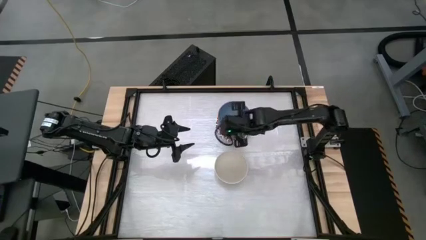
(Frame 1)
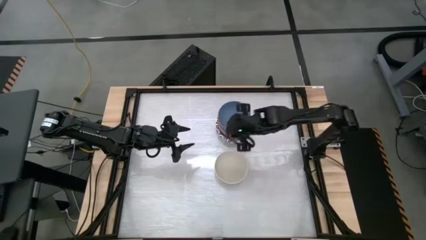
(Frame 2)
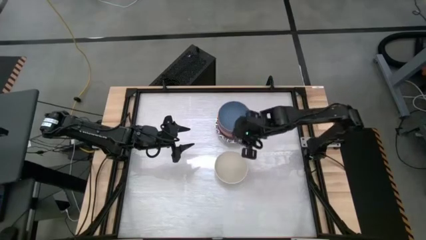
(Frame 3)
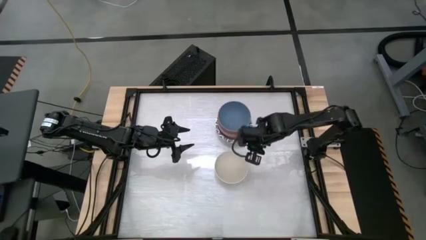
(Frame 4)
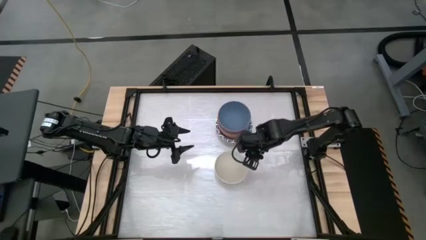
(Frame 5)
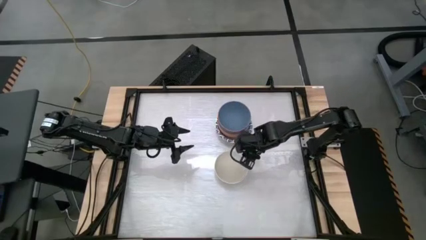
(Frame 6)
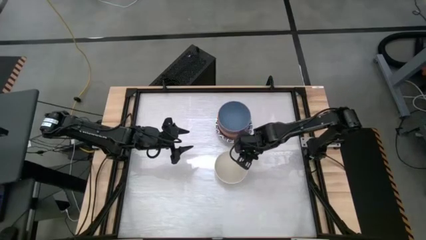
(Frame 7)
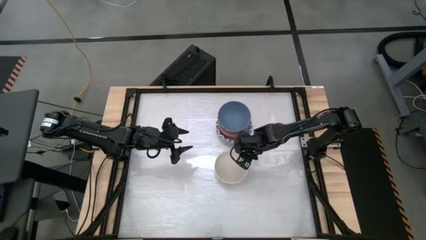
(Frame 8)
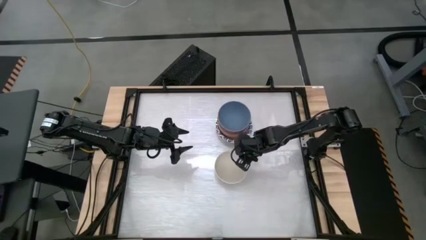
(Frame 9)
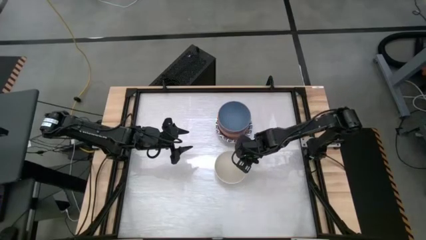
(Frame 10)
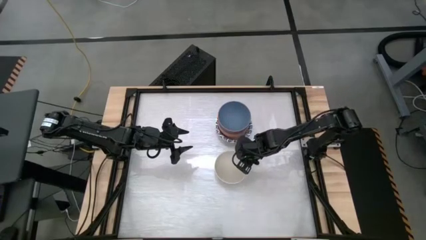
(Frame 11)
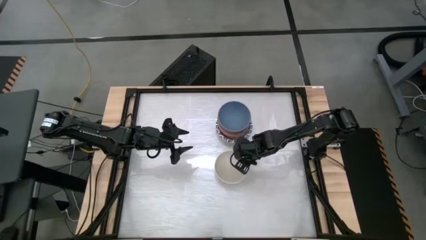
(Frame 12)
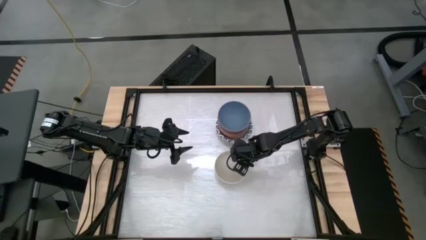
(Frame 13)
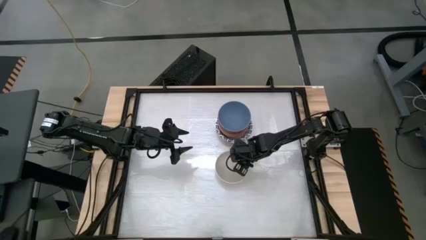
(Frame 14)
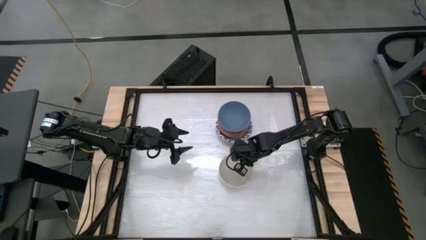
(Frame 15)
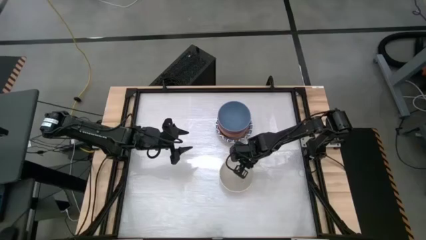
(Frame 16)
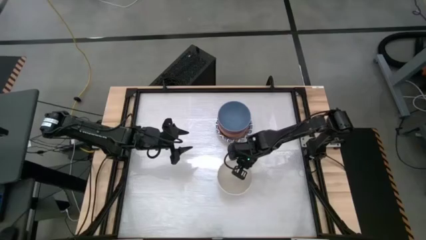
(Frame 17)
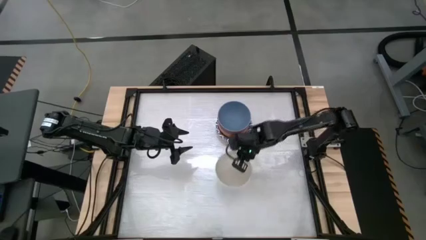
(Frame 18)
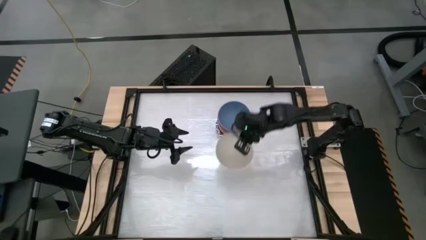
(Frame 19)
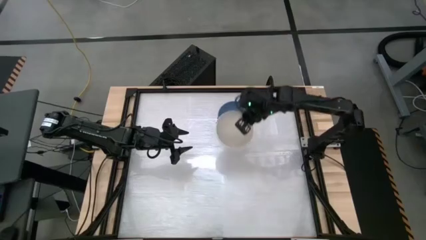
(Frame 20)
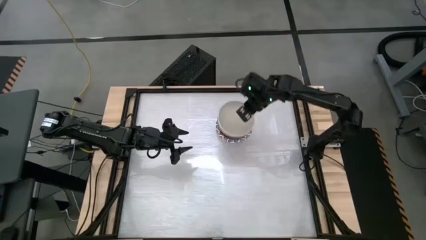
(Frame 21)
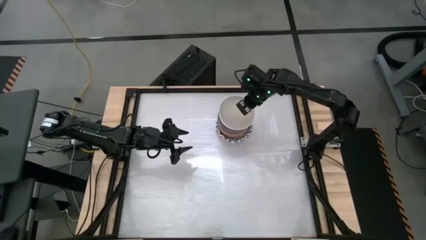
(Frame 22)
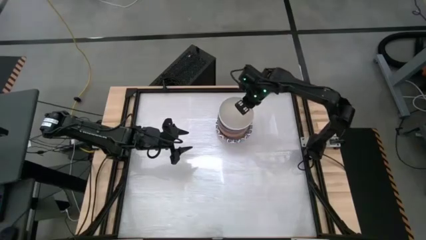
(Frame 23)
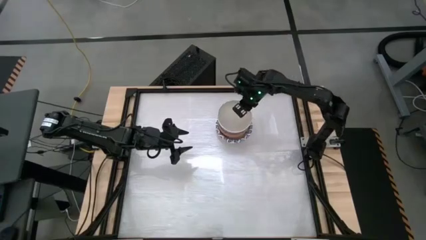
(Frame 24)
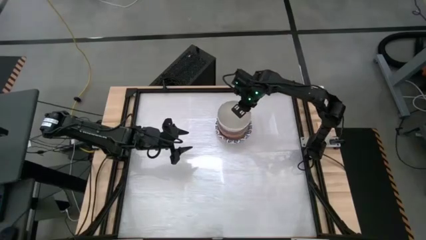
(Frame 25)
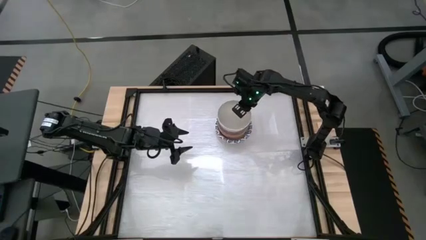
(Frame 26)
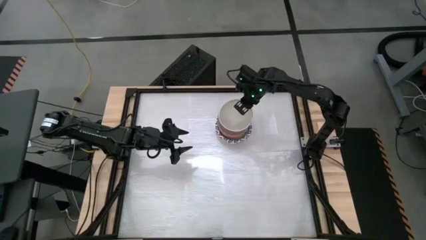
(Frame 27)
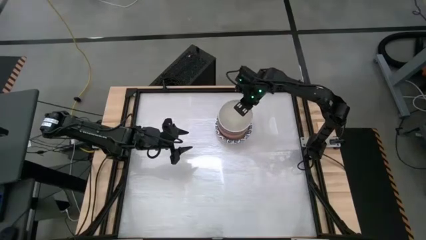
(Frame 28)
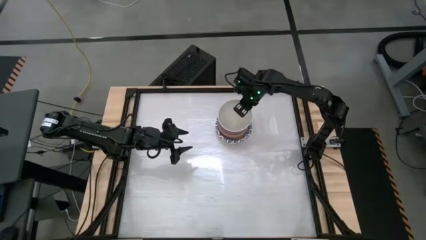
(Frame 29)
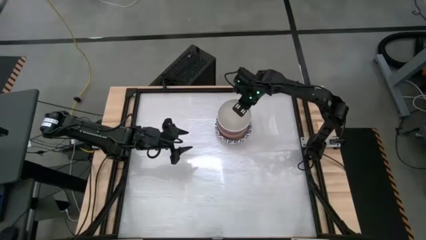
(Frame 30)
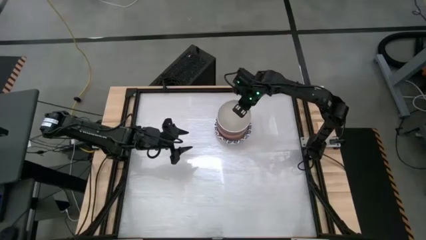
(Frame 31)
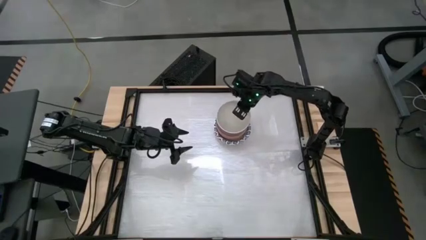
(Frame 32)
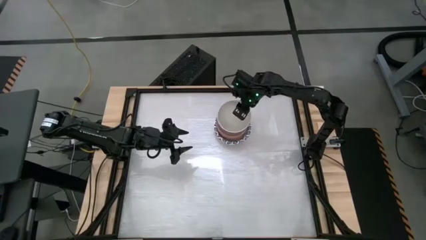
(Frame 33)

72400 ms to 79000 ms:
Task: Nest bowls inside each other by size order
Stack the white bowl on top of the blue bowl

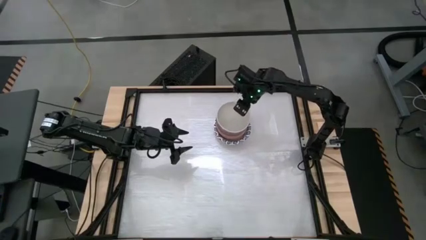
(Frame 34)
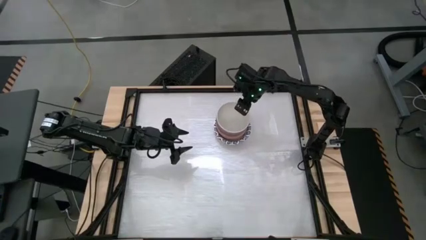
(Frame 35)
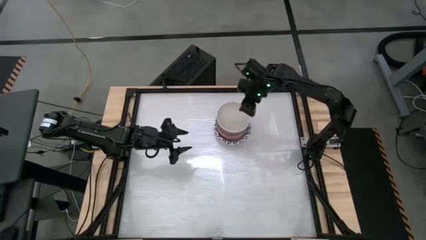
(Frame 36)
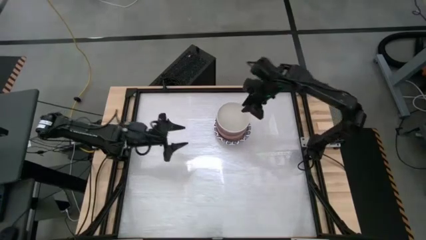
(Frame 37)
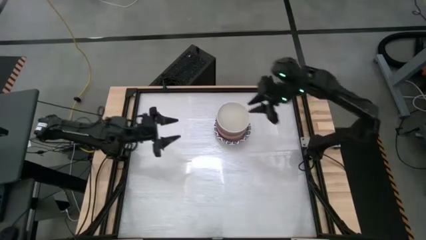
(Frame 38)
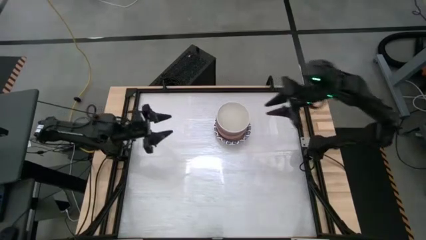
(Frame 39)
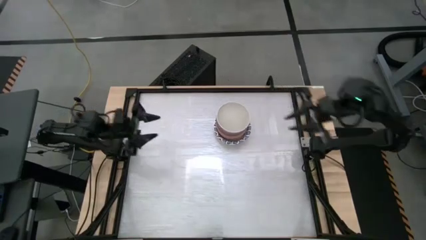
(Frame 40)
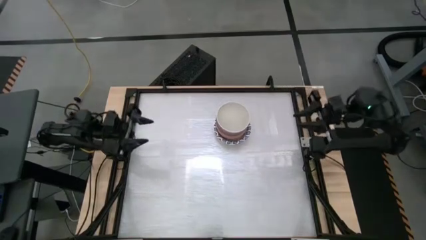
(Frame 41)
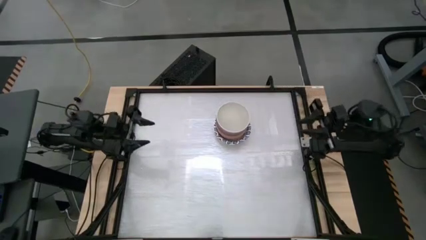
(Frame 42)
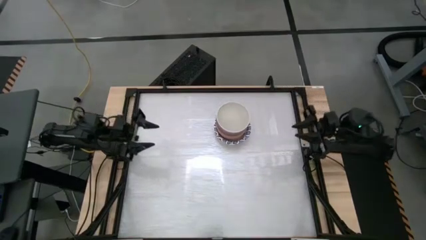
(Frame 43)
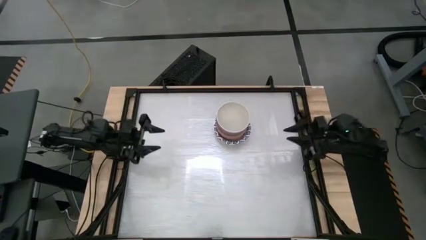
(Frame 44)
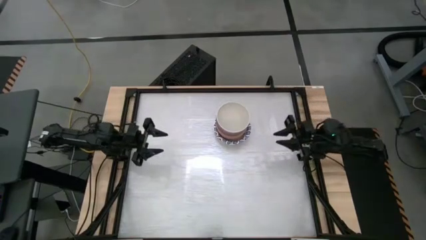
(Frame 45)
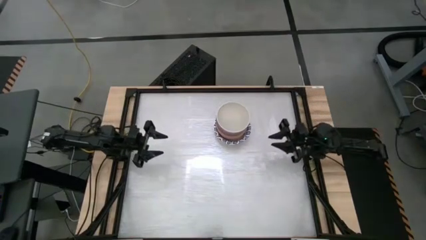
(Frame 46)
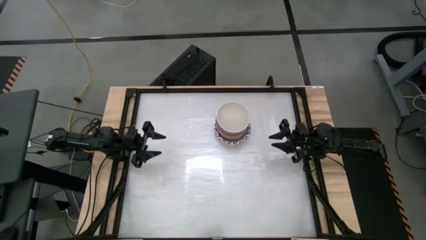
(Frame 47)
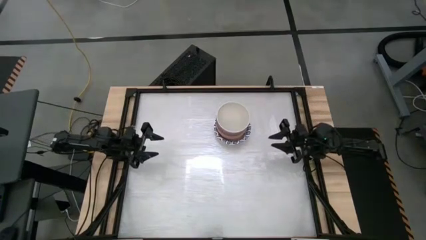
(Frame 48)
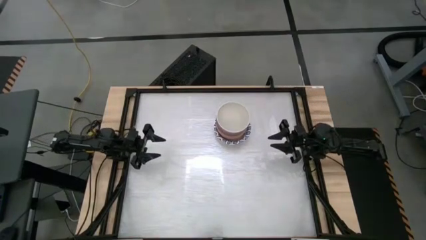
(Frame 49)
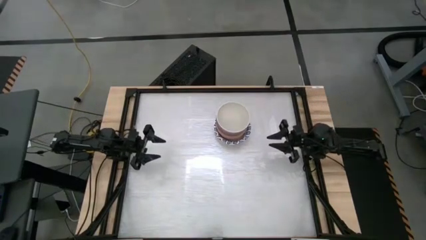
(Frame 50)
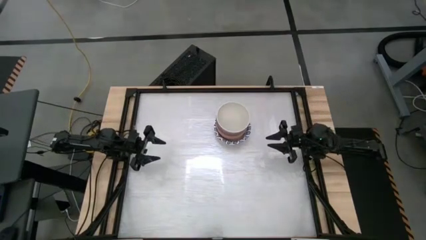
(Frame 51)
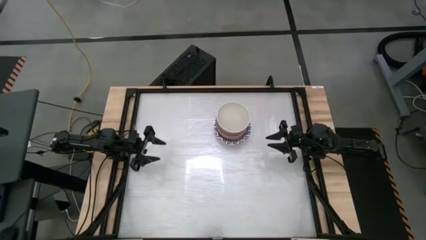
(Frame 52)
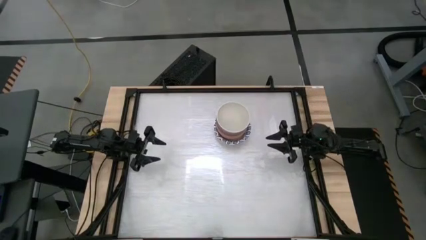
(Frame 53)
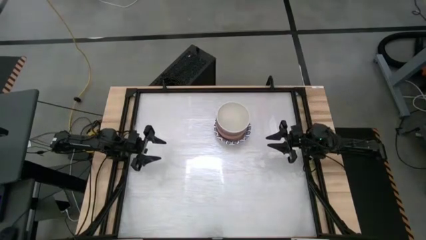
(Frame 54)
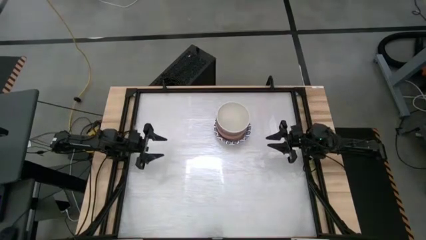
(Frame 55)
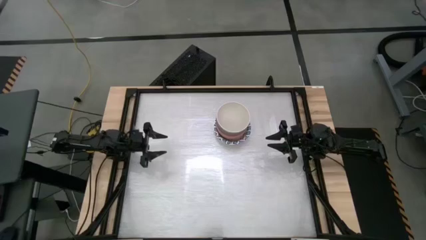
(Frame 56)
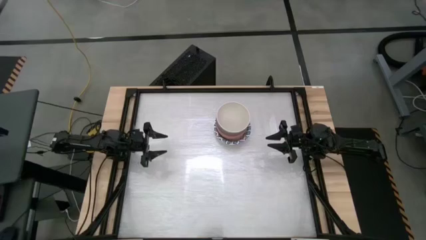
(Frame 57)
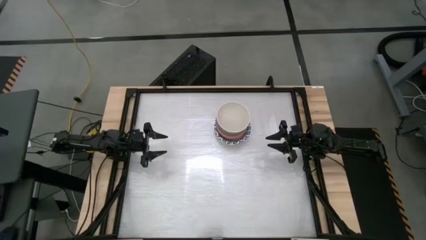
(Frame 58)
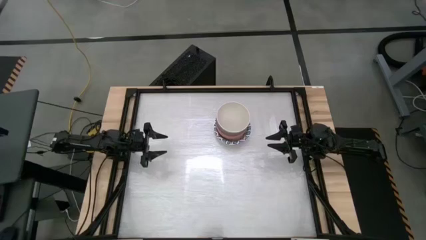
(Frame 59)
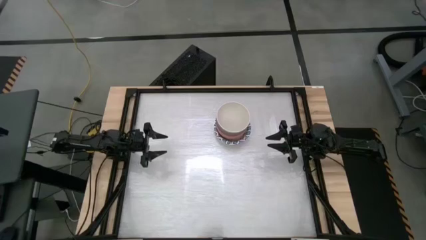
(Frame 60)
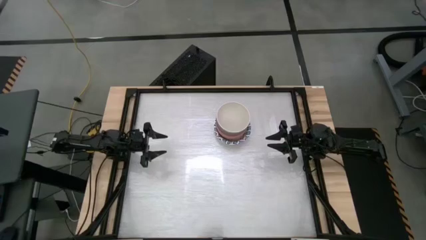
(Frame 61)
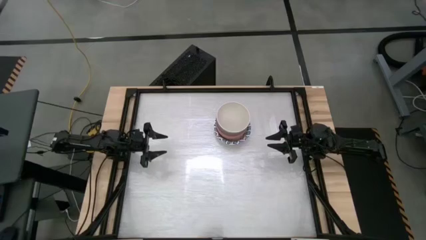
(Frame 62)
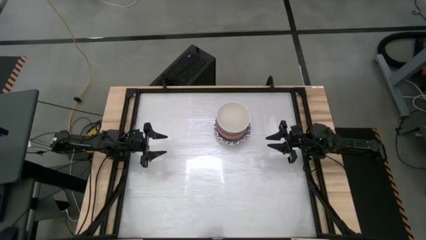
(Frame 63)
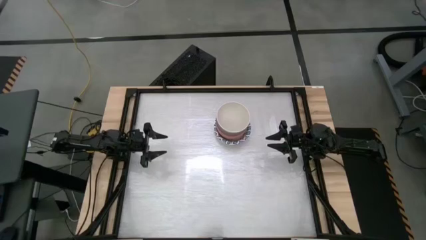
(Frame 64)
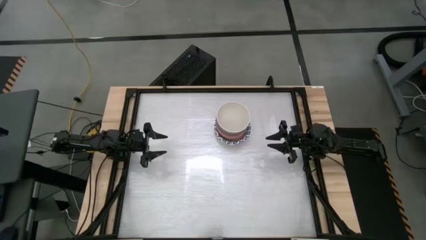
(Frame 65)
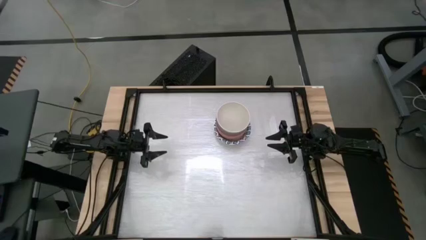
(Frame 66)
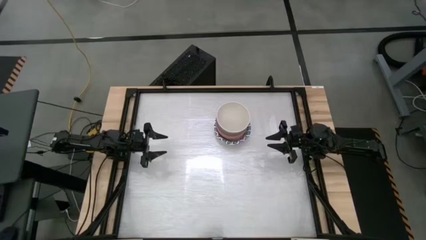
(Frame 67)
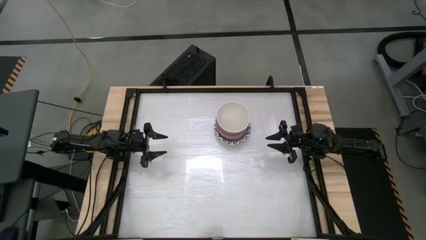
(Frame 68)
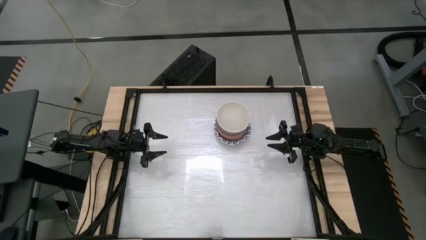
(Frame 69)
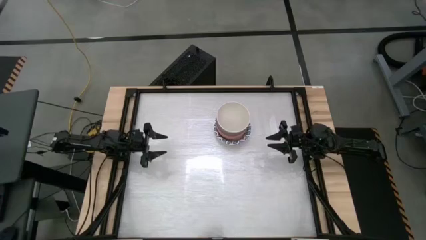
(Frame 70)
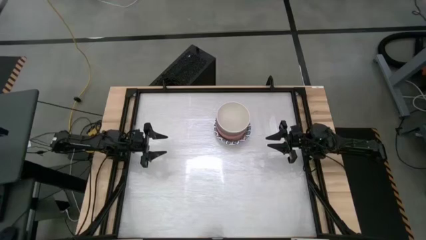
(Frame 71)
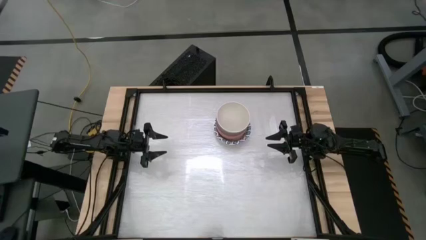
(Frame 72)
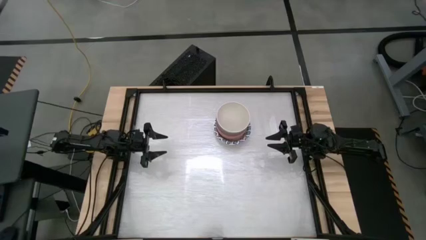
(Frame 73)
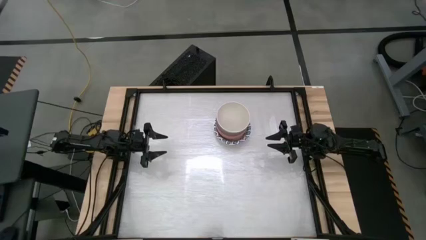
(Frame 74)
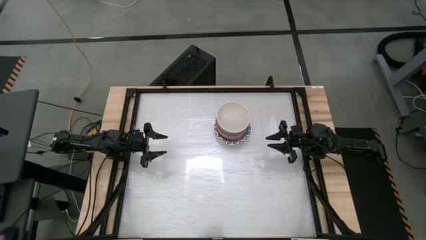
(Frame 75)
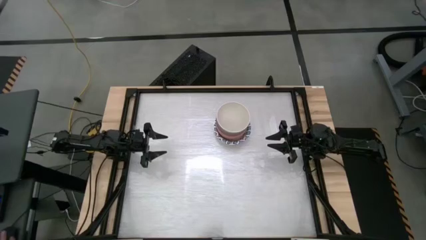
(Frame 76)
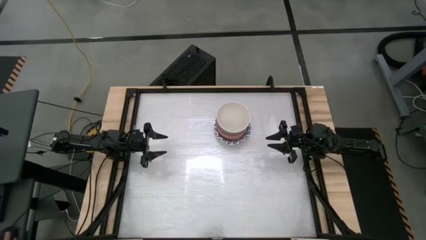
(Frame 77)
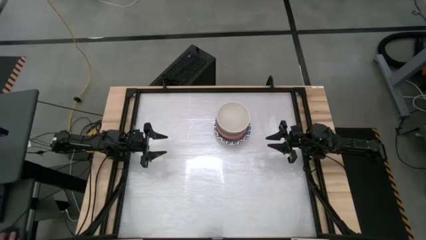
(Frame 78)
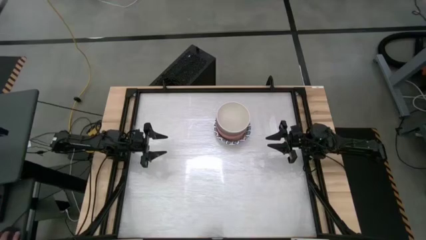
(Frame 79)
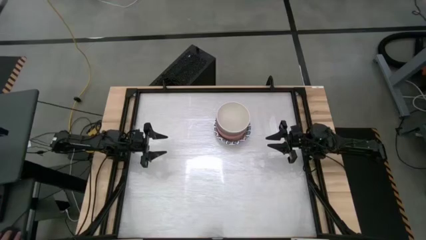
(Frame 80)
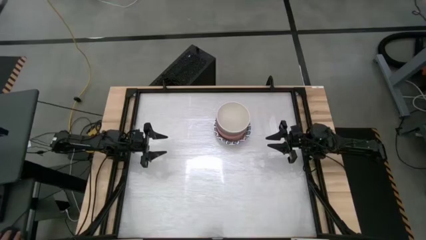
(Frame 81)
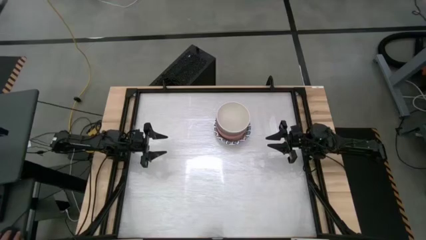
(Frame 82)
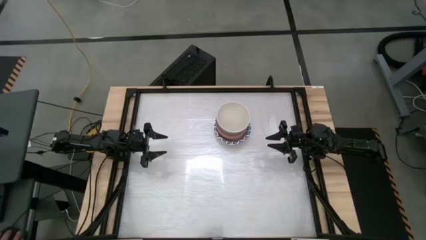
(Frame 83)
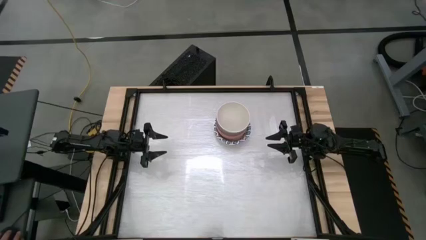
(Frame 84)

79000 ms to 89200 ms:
Return to home position
